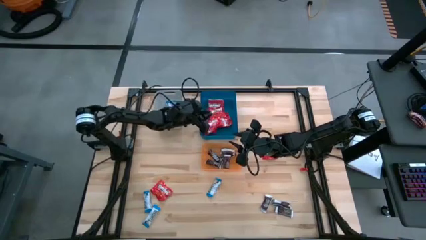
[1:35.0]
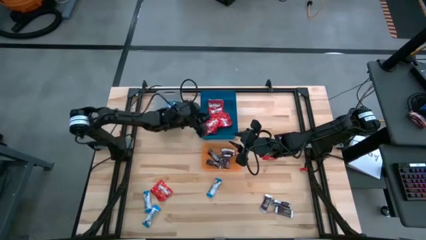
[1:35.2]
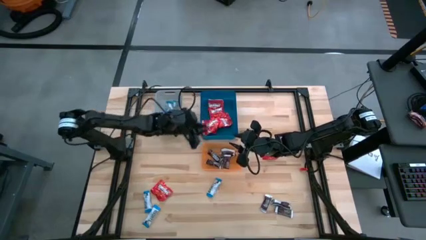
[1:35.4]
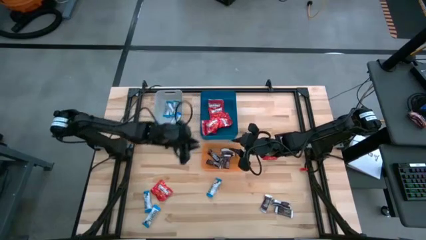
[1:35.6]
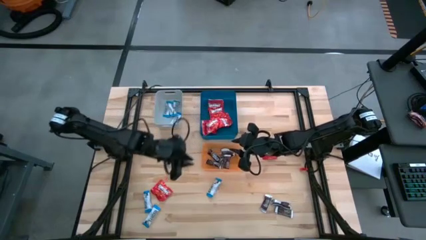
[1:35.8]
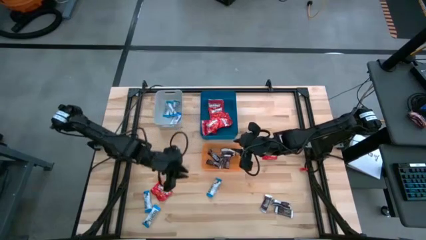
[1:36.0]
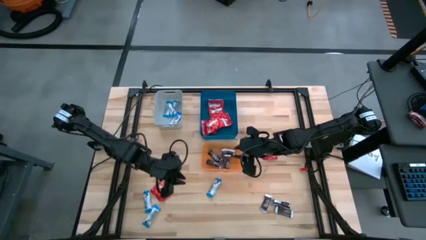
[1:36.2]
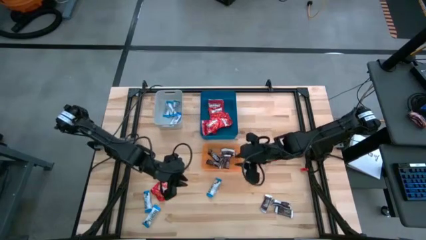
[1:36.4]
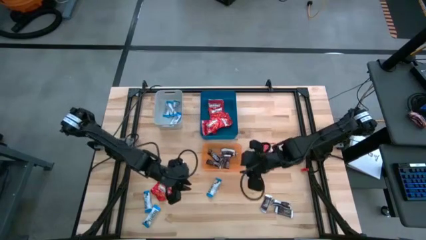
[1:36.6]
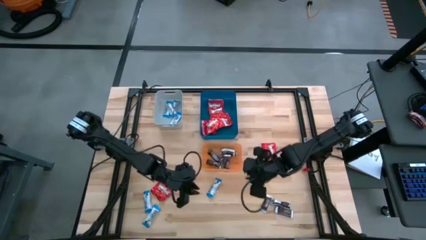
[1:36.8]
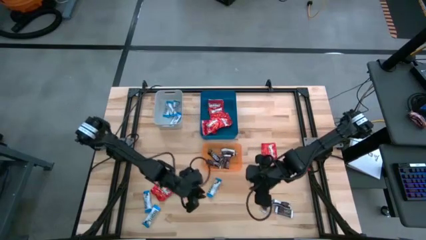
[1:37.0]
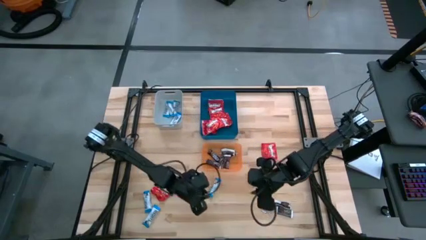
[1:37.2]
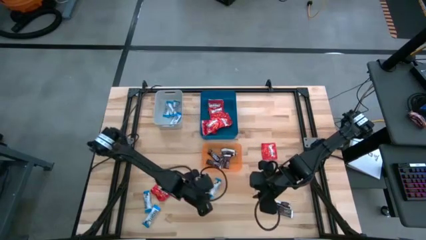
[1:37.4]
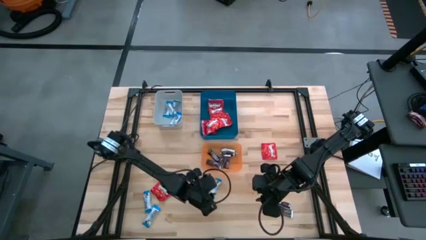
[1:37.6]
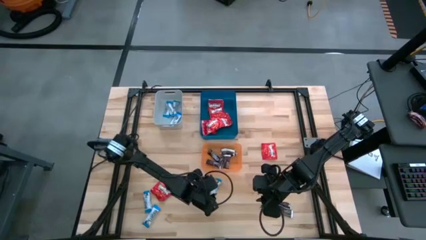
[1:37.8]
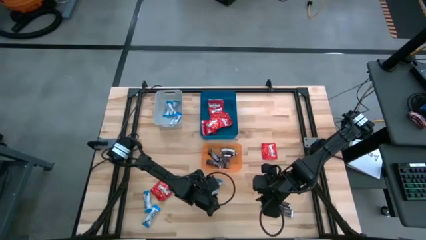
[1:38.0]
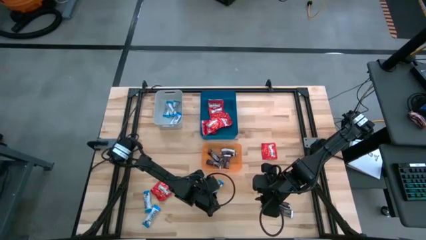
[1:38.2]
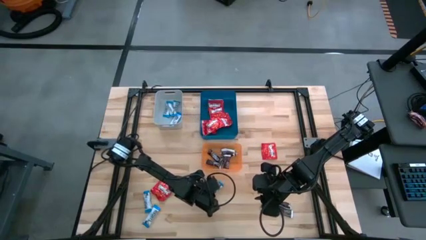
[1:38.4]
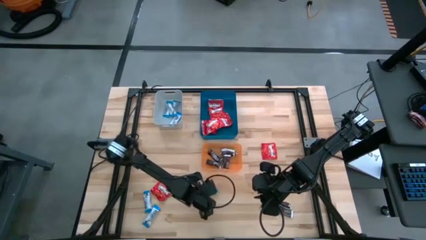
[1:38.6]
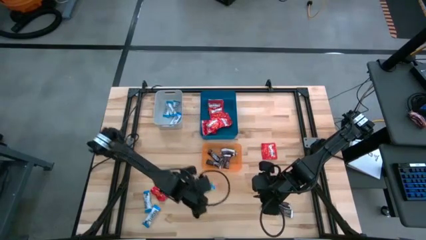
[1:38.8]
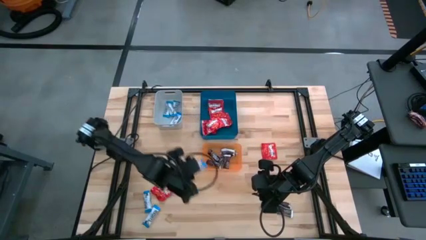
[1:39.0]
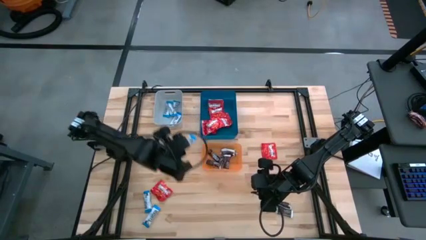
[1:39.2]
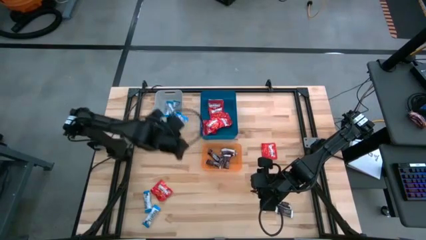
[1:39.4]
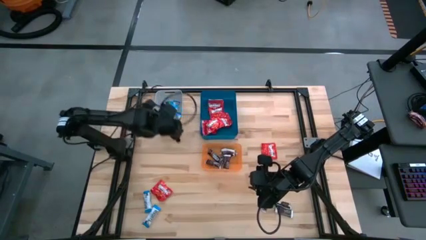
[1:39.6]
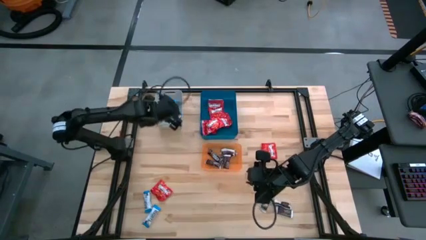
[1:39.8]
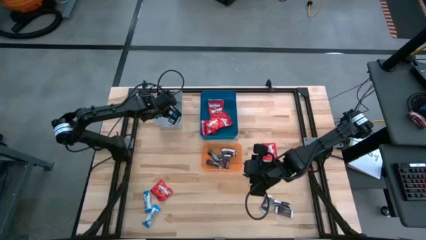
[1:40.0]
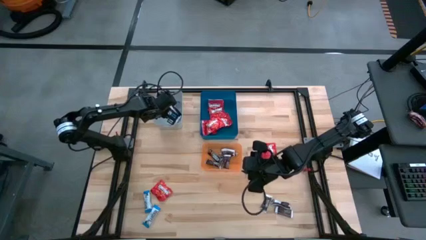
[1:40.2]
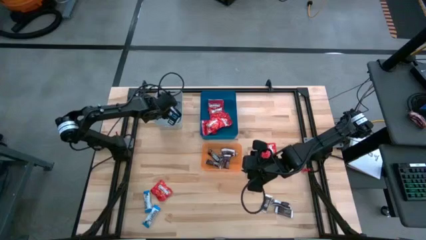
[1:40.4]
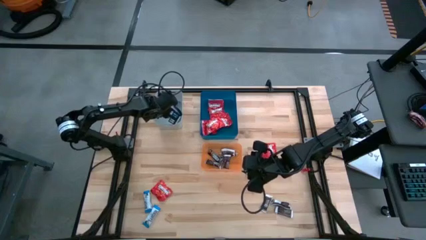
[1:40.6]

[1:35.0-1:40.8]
Task: Sort candy
Put the blue chocolate bar into the gray bin

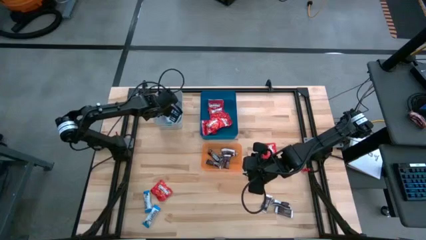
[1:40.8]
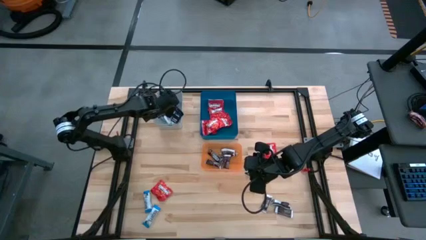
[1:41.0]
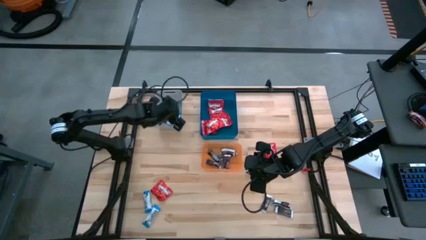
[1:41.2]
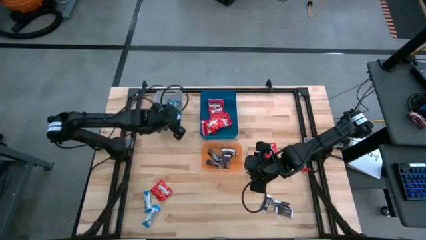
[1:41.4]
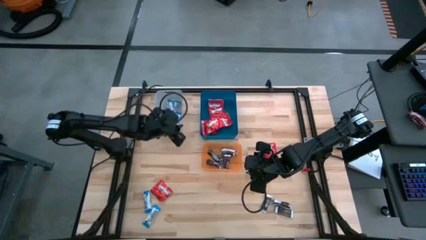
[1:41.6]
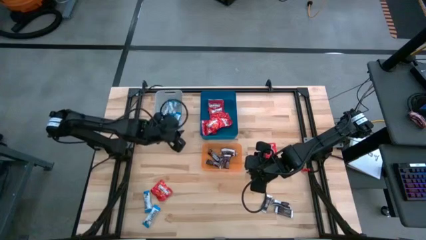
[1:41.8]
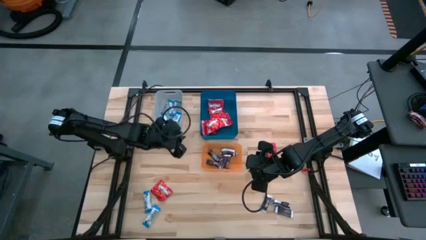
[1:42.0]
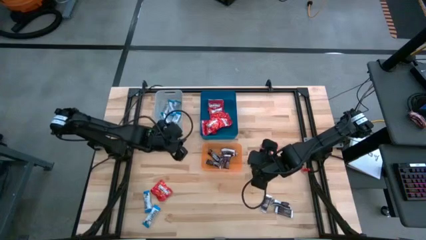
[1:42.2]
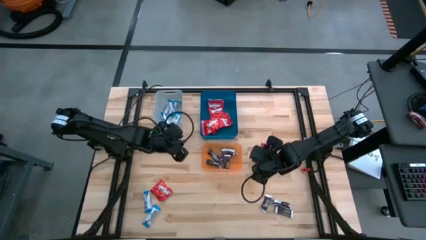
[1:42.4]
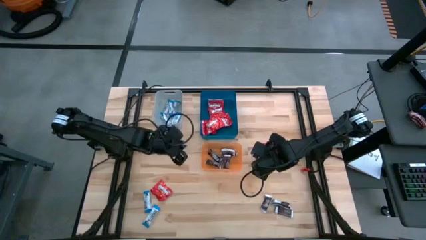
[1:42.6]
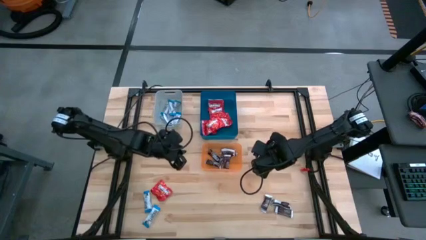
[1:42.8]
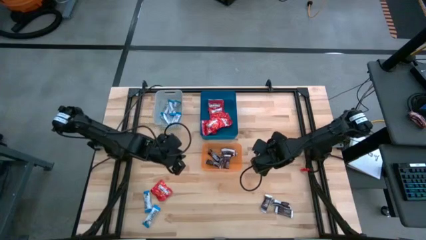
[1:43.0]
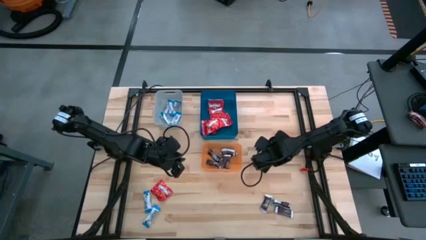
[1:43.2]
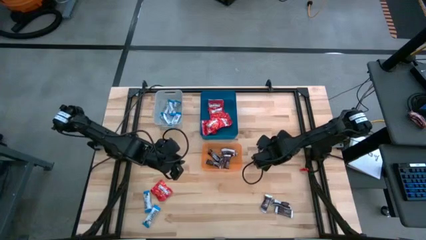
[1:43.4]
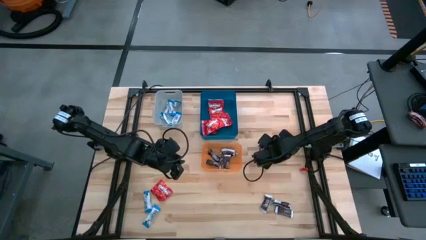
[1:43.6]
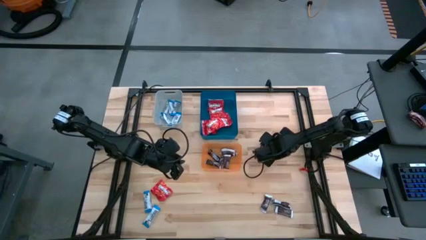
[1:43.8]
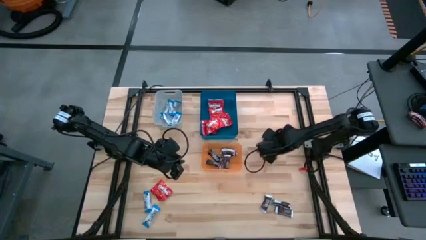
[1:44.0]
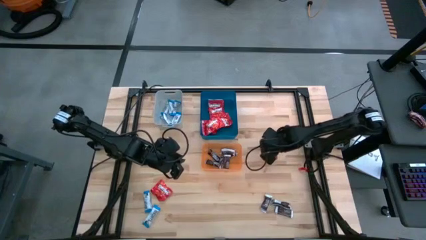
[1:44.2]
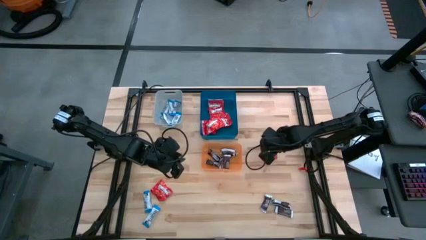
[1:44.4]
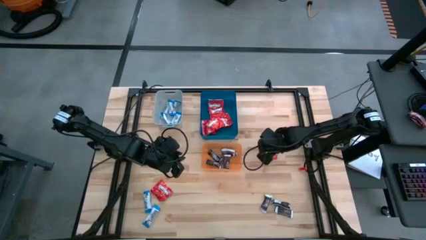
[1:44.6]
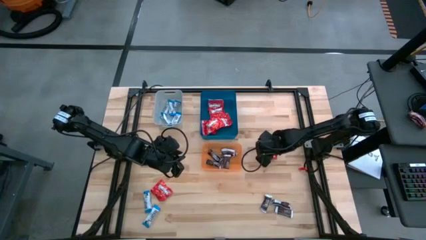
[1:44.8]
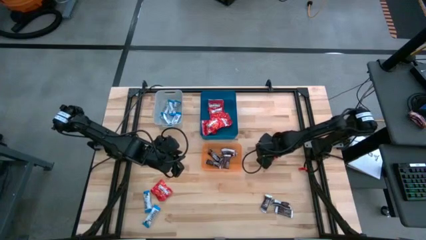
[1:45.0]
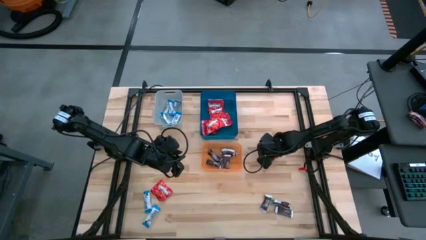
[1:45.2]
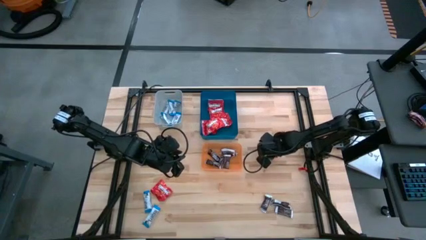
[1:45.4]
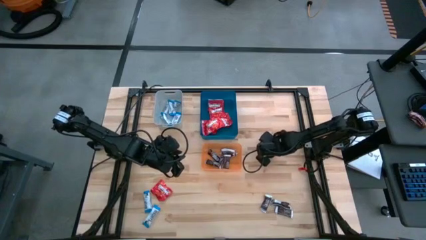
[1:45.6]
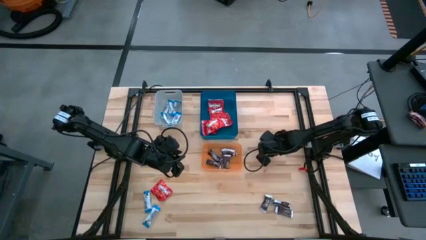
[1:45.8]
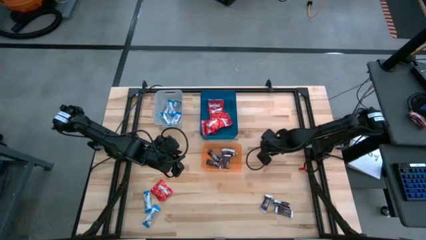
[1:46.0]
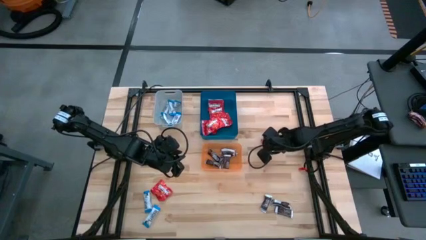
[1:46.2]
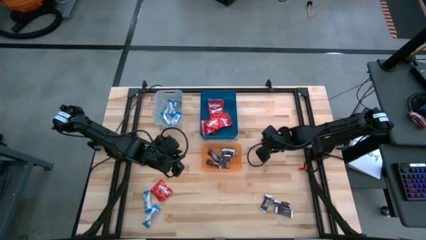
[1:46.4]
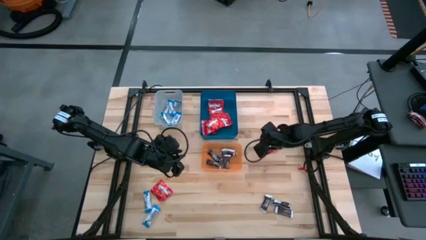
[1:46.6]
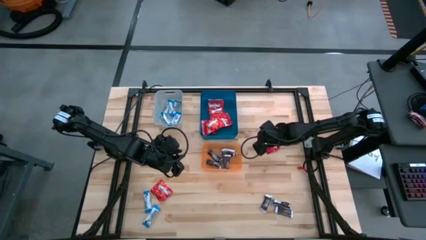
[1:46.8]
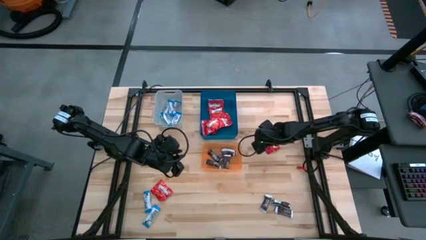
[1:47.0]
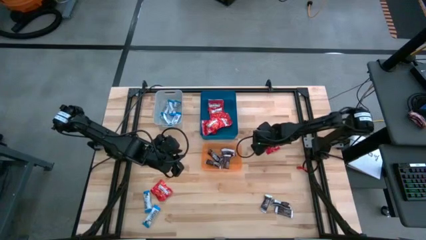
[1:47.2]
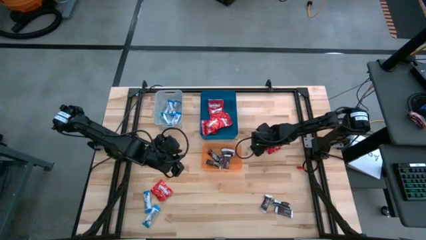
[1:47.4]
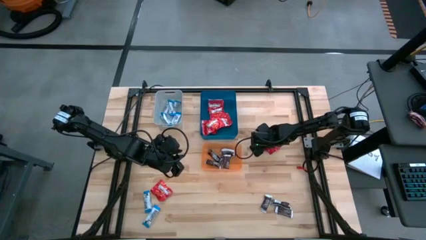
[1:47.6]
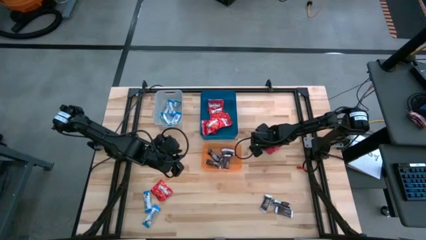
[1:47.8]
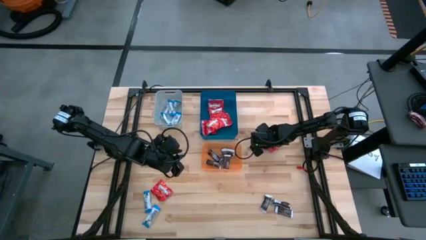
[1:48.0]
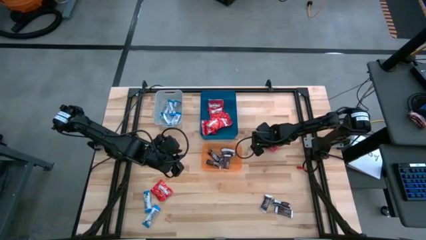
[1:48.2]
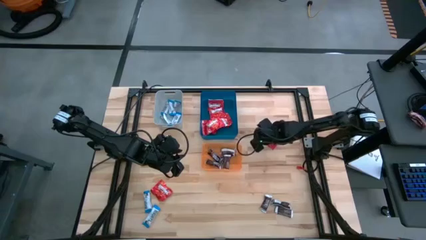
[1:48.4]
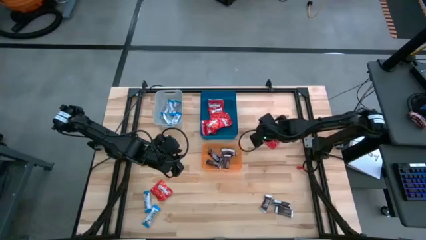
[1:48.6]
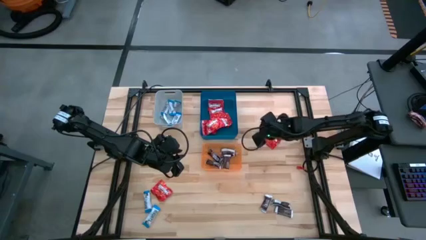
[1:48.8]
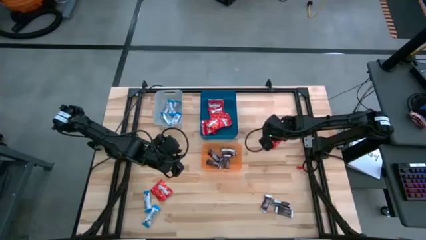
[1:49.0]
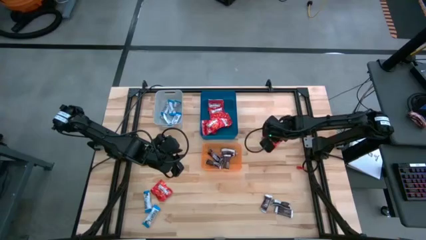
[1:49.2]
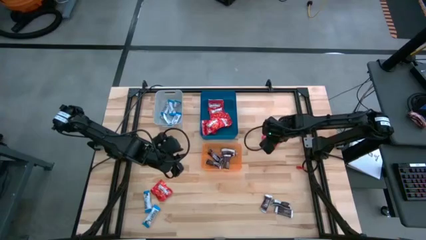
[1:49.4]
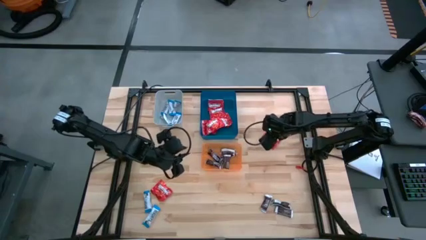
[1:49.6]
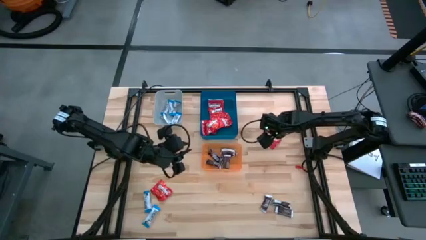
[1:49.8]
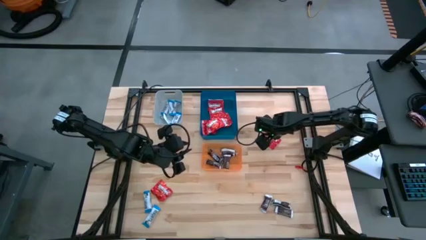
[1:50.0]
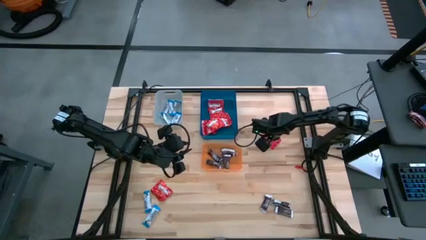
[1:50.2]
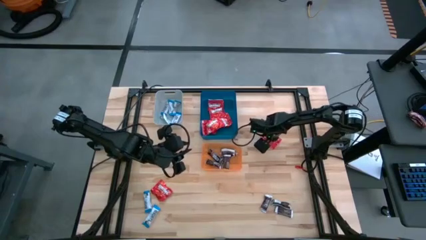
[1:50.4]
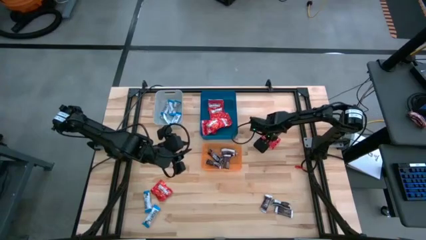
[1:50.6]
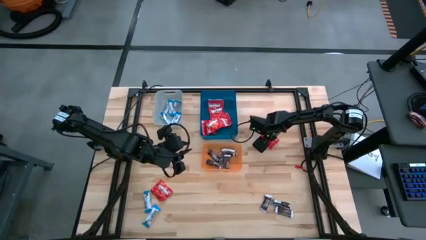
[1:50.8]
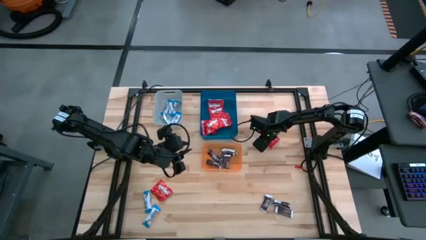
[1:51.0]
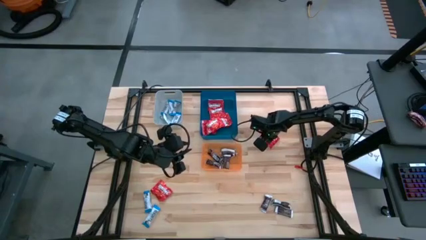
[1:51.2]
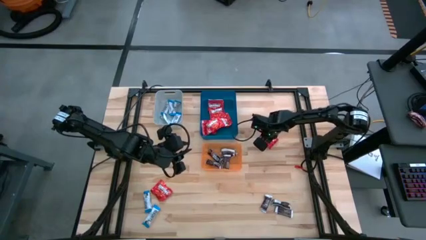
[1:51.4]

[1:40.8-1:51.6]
Put the red candy into the blue bin
